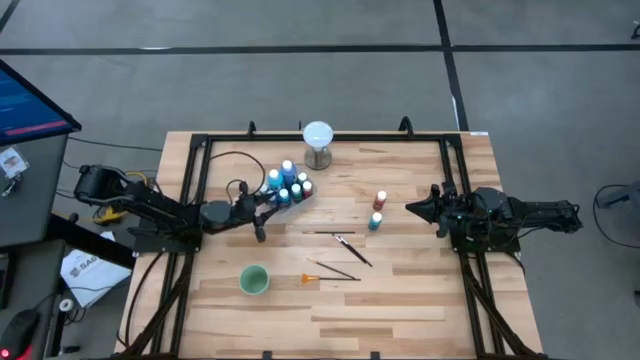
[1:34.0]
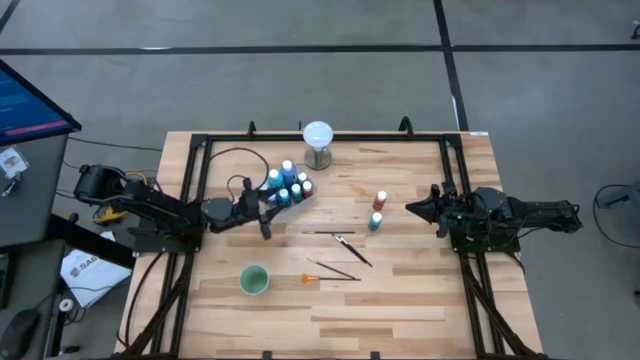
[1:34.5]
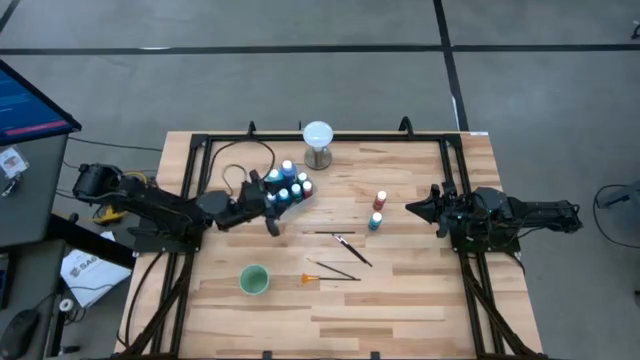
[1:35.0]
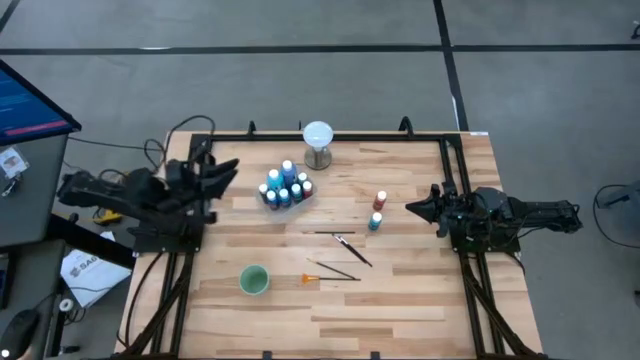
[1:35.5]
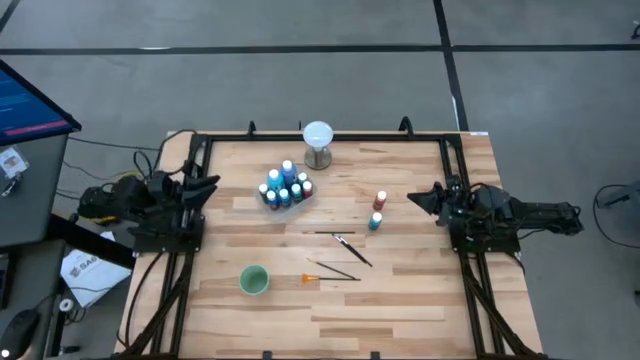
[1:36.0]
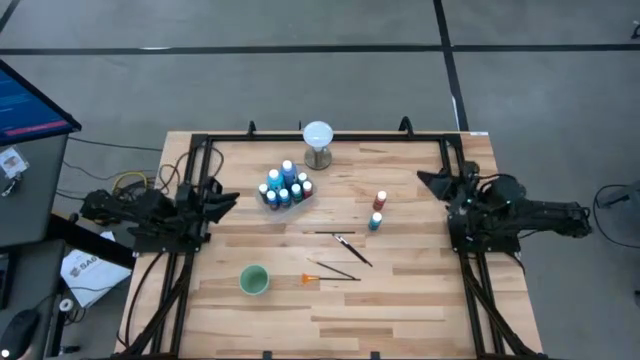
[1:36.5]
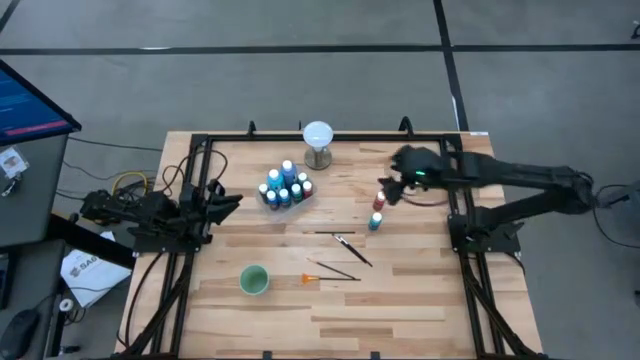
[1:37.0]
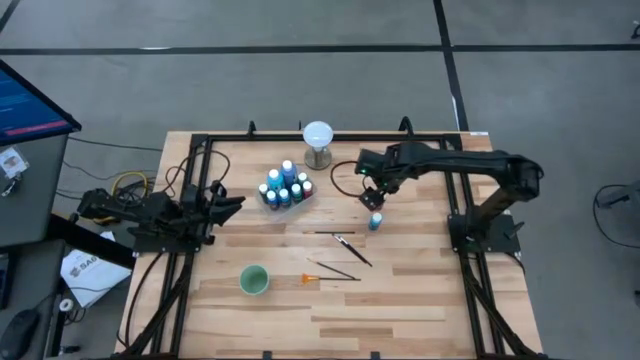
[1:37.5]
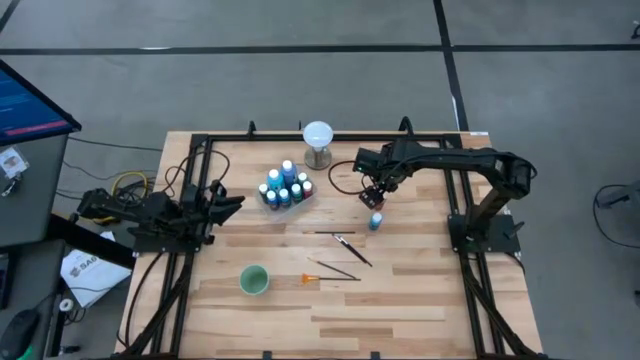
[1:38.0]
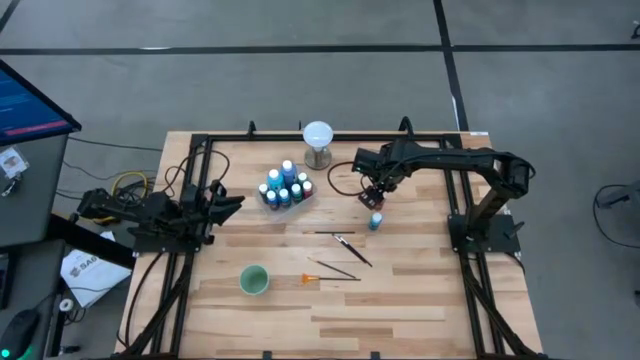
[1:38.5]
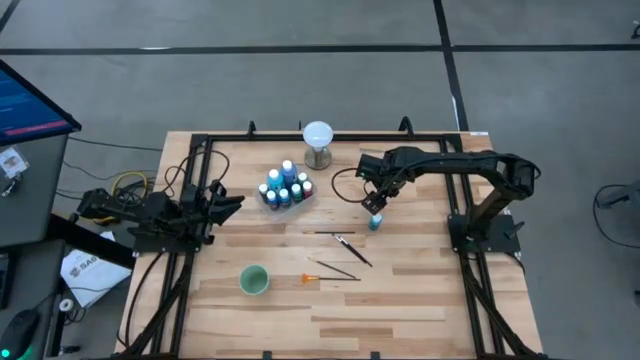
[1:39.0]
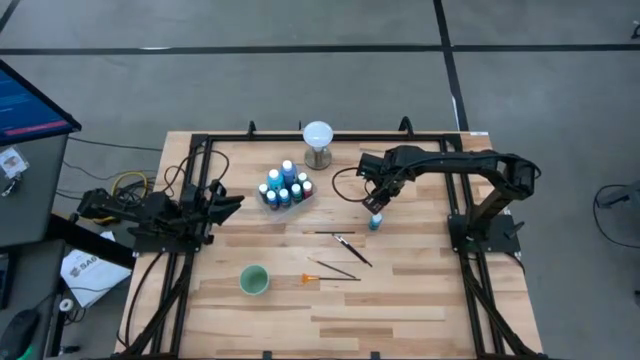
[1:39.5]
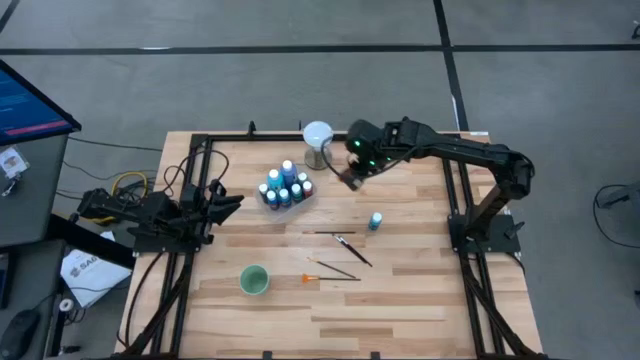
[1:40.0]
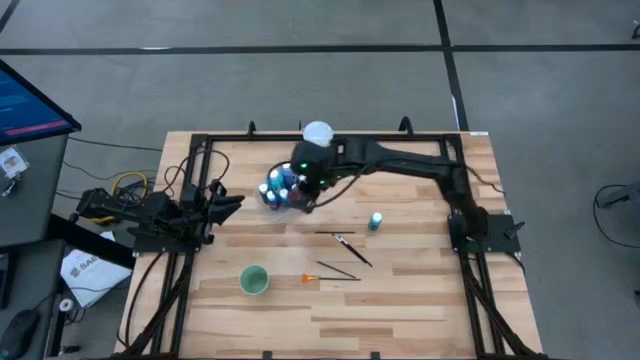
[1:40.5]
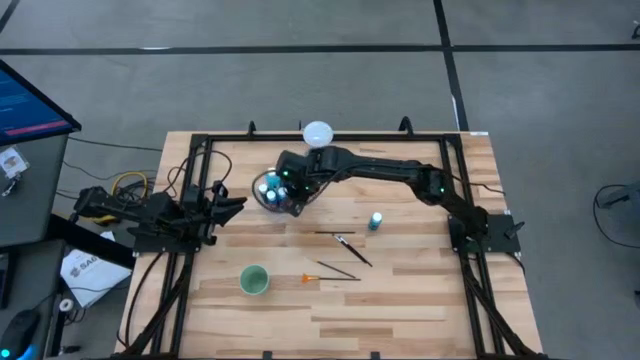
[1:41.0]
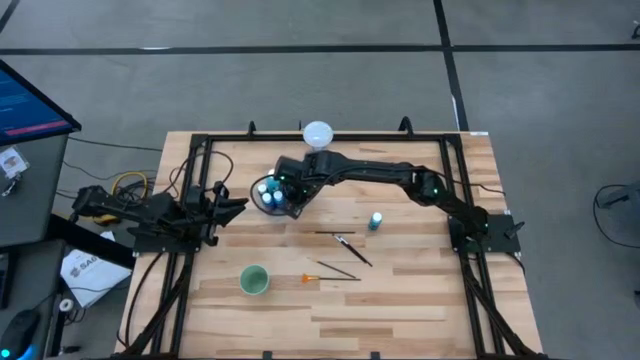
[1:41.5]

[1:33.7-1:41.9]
Task: Pick & Place Paint Supplies
Put the small red bottle into the white bin

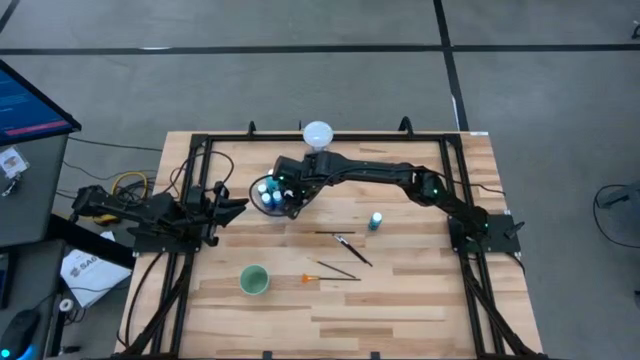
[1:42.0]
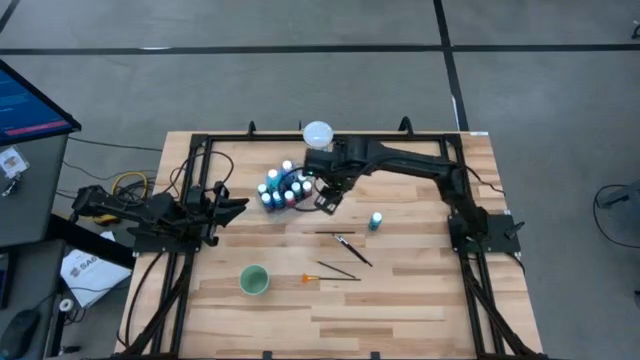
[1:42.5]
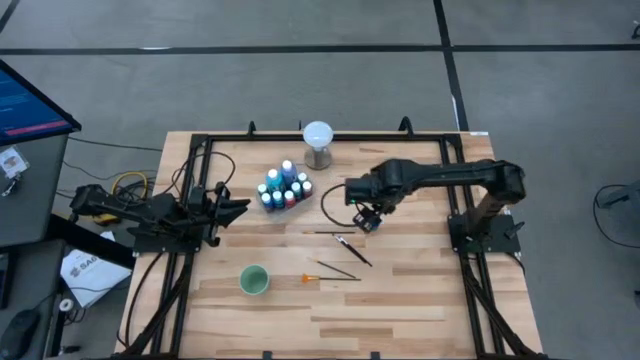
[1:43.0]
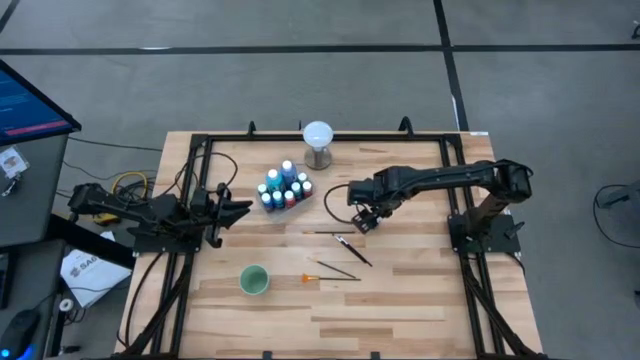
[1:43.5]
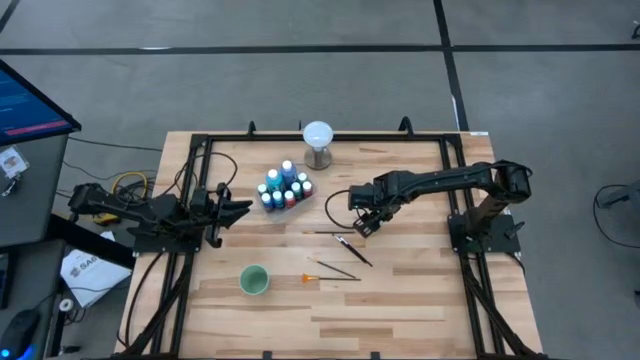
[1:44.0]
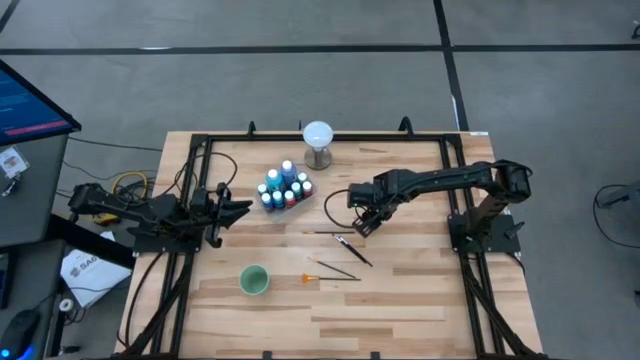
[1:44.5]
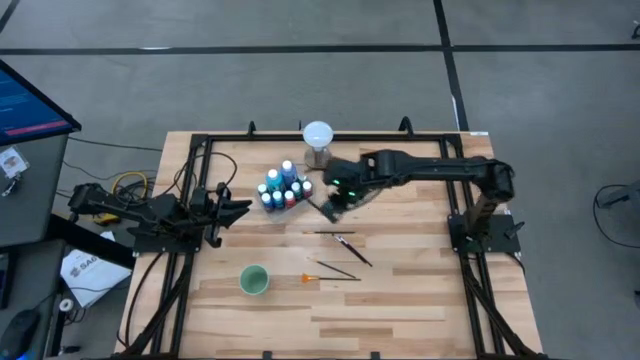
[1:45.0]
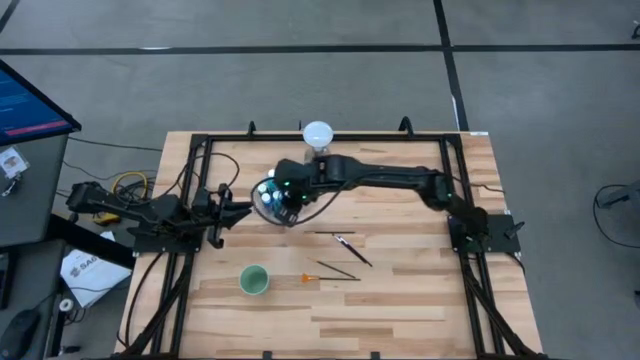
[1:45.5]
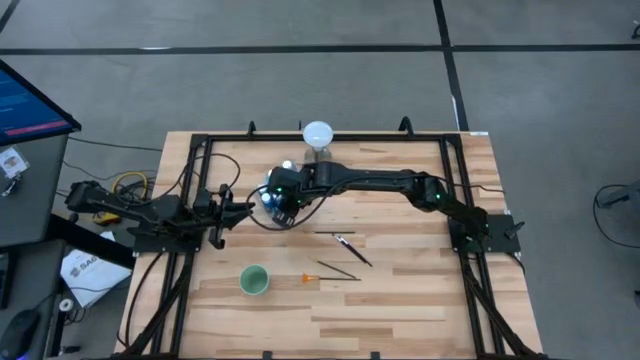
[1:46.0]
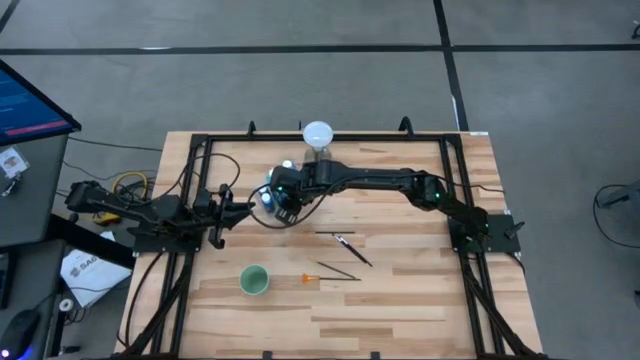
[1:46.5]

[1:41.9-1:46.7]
Put the small light blue bottle into the white bin

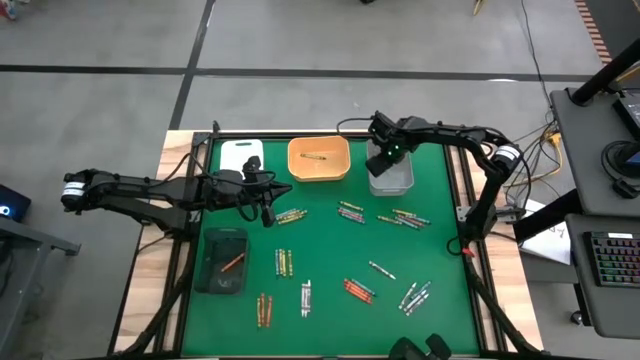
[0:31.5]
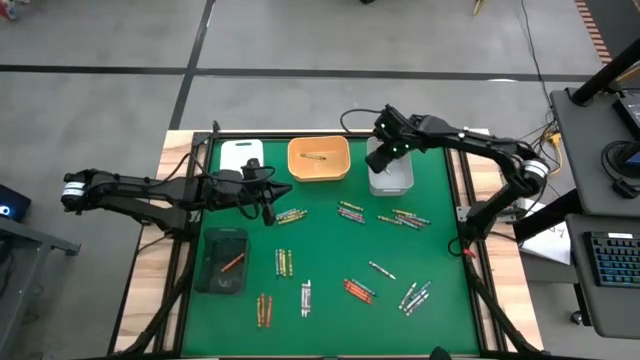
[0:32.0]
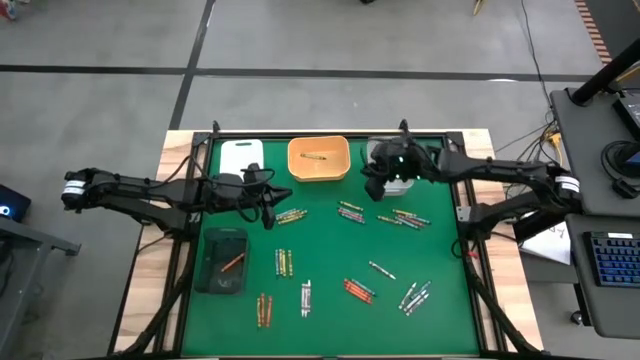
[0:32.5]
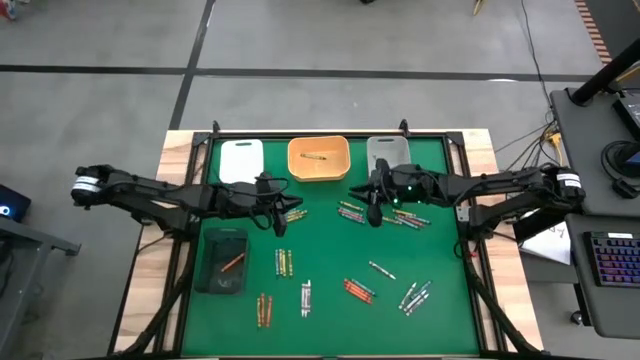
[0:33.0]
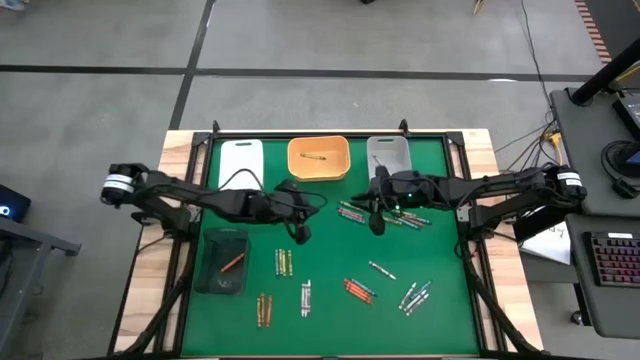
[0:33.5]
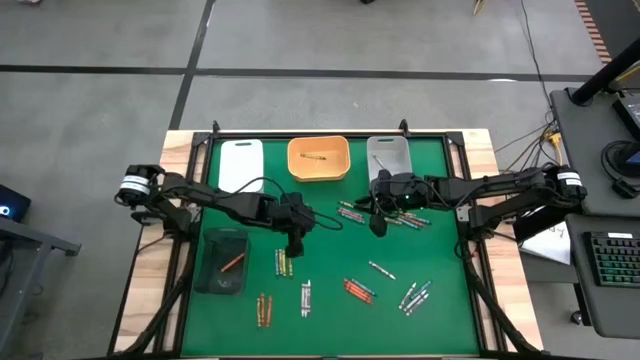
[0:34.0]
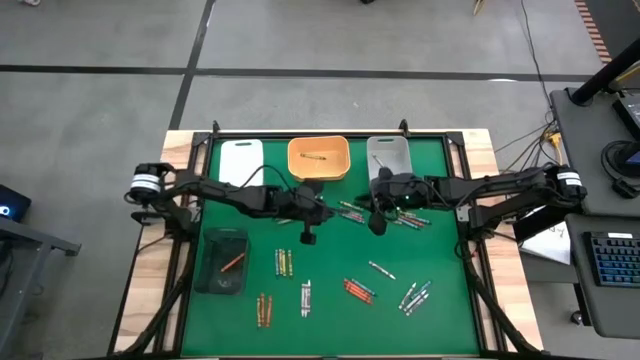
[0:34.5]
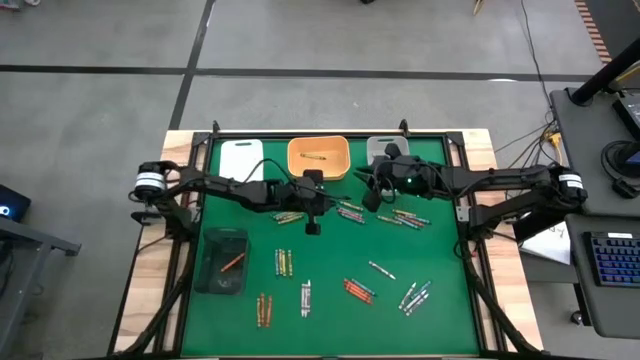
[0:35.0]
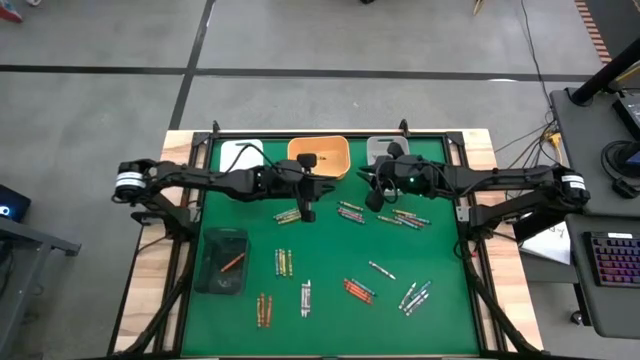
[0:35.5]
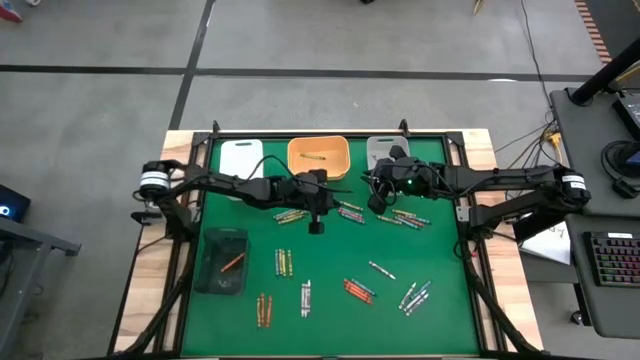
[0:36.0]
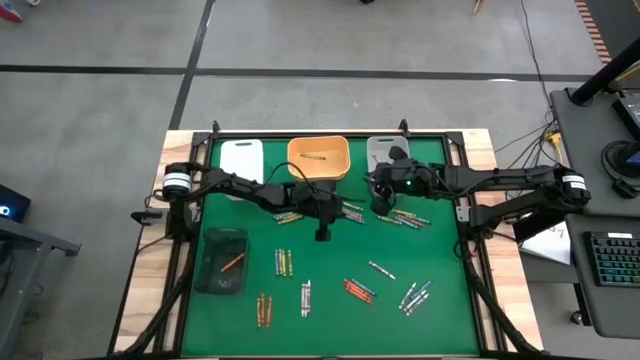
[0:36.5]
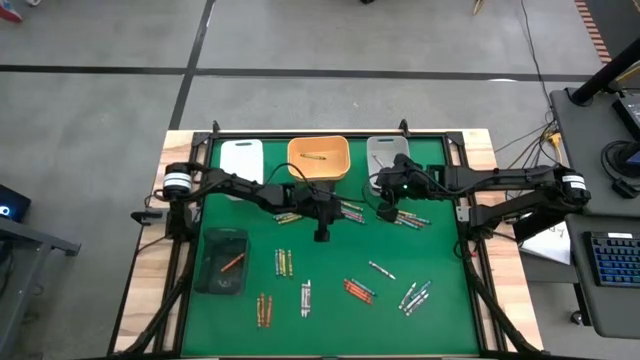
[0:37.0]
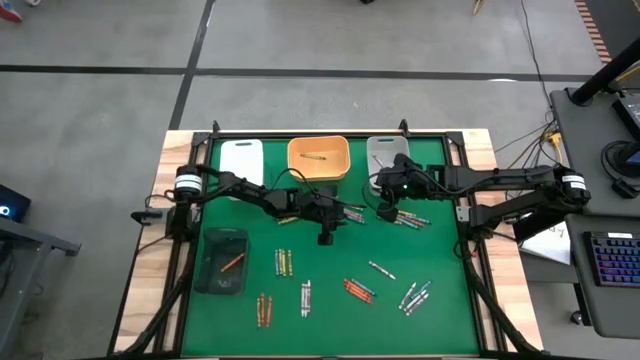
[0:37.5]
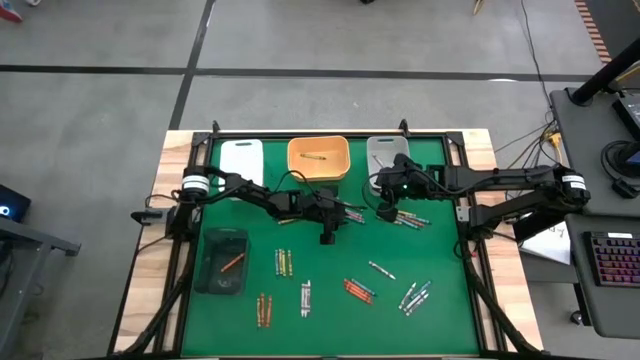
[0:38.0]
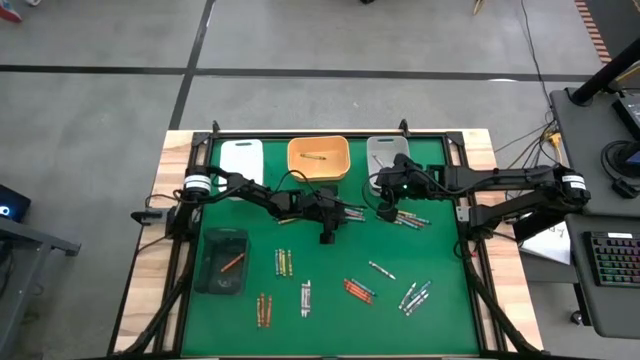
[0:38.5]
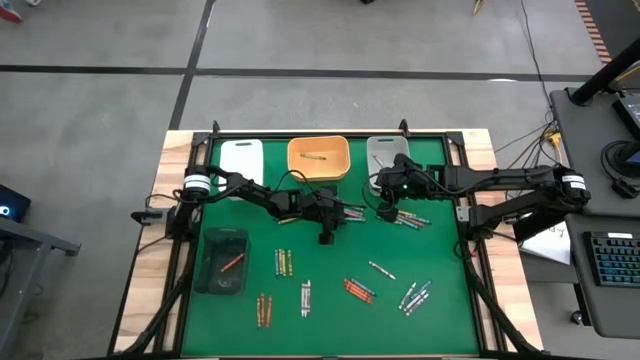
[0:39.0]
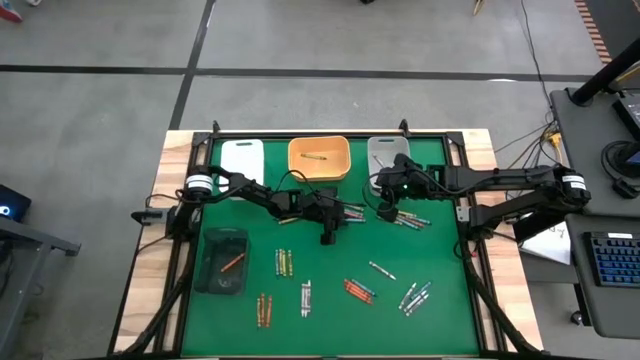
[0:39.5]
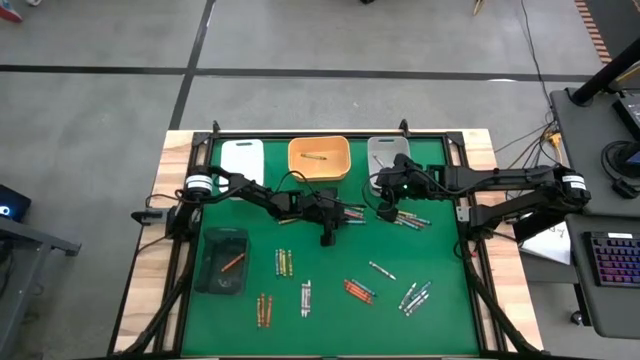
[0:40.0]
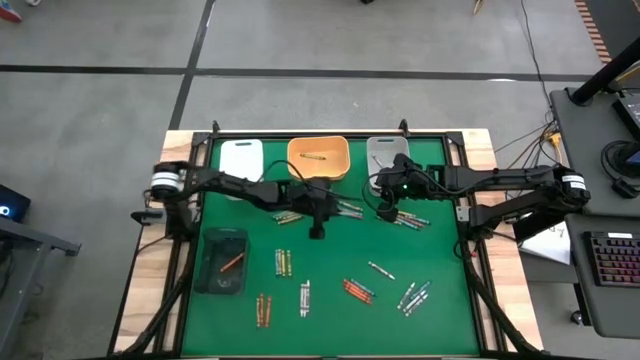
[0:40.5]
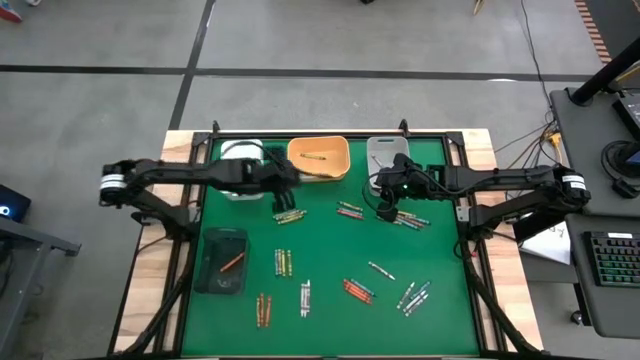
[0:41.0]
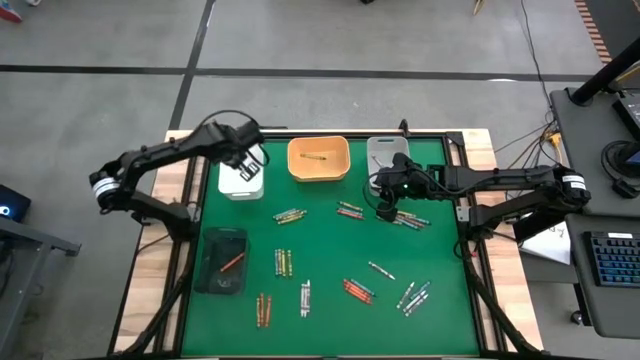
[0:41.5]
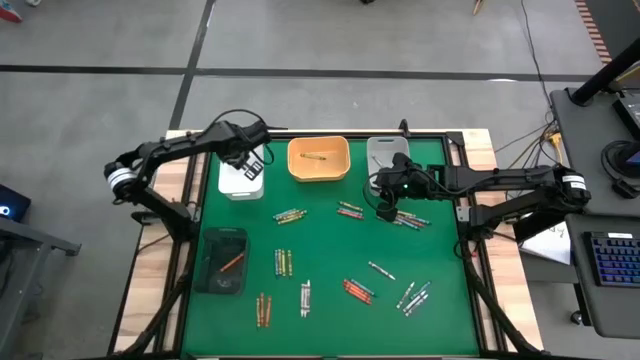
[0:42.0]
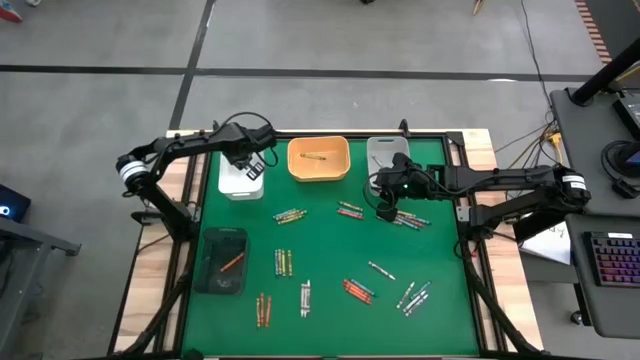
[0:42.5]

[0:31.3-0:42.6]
Task: Sort crayons
Put the blue crayon into the white bin
